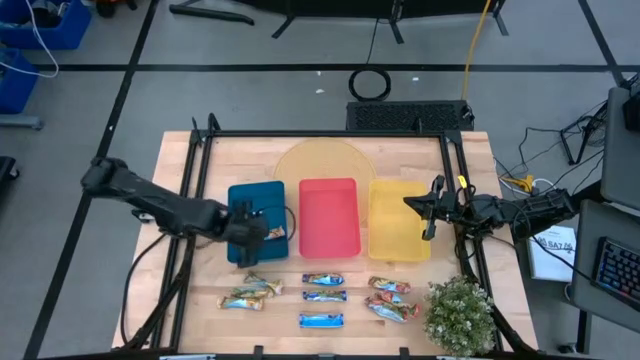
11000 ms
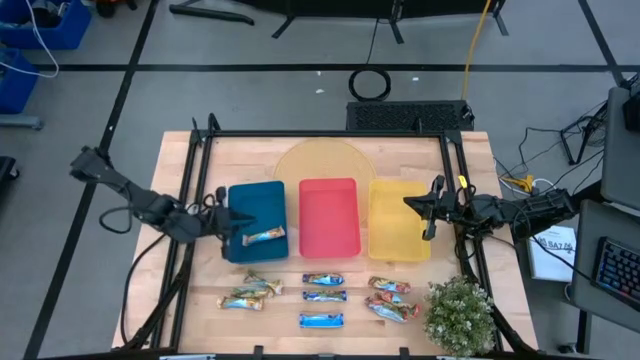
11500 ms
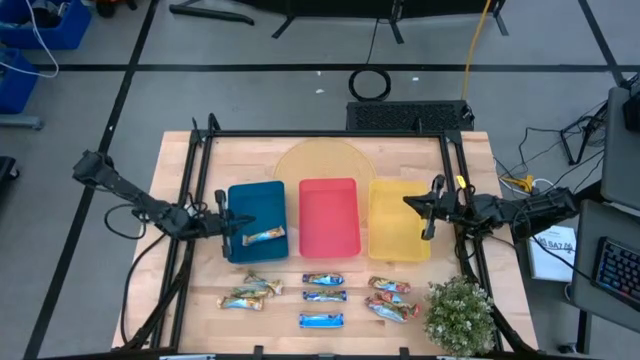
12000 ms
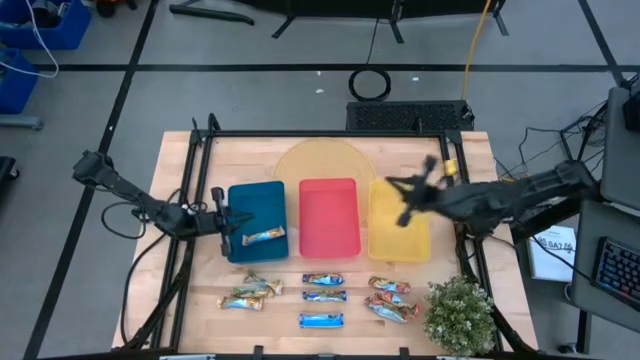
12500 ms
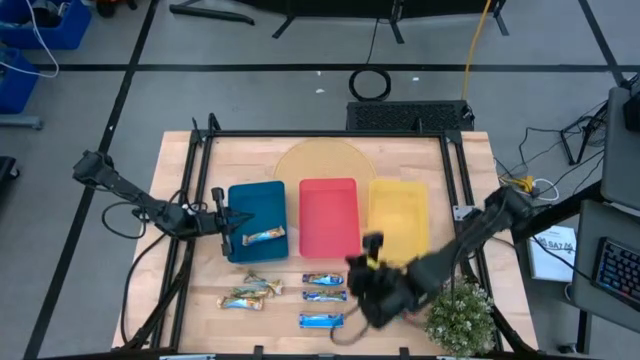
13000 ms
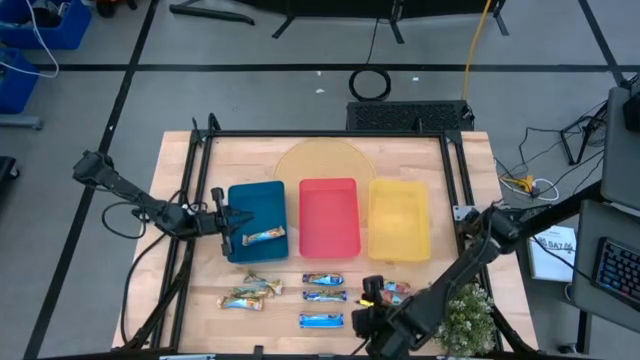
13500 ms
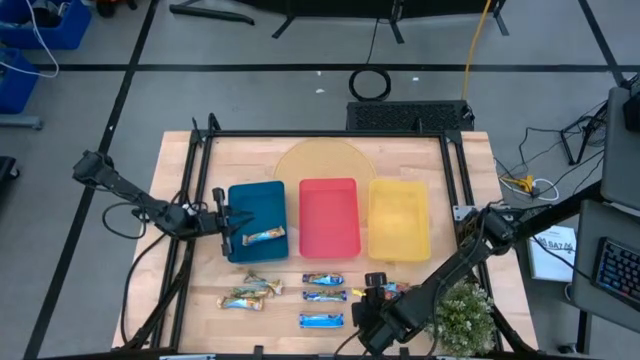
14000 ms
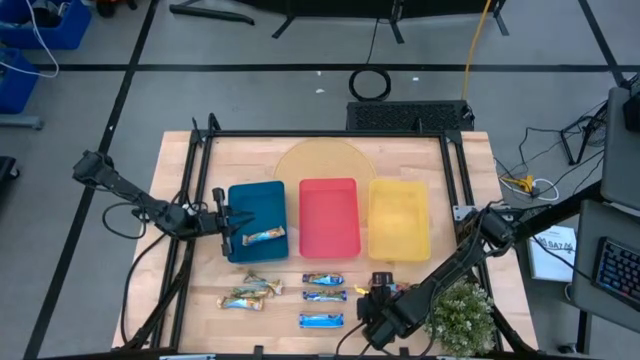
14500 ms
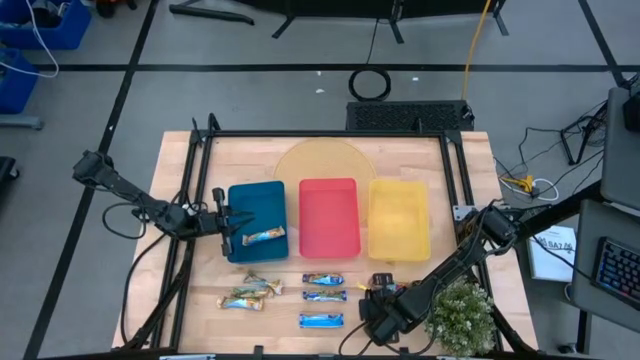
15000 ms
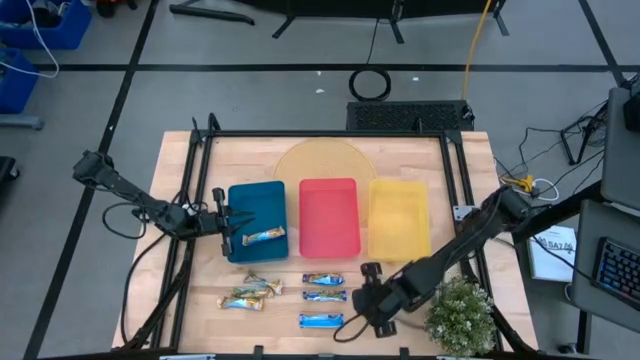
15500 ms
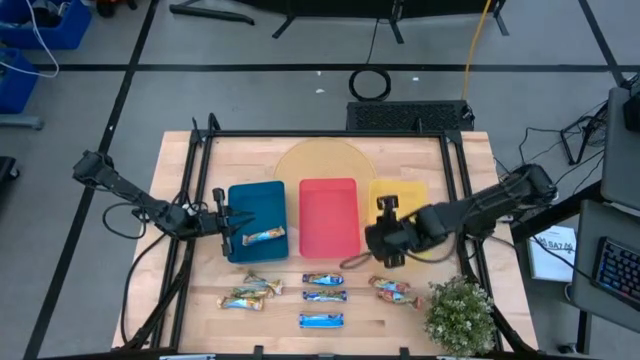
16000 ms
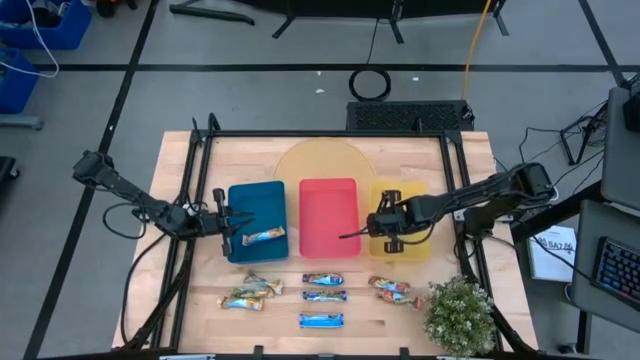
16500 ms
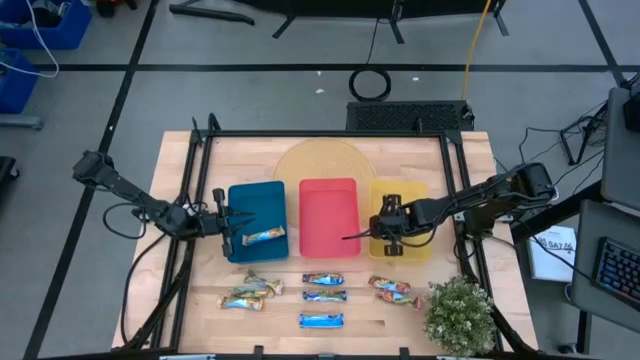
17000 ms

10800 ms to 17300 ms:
Task: Pick and place Granola Bars by type
Put the bottom red granola bar into the yellow bin

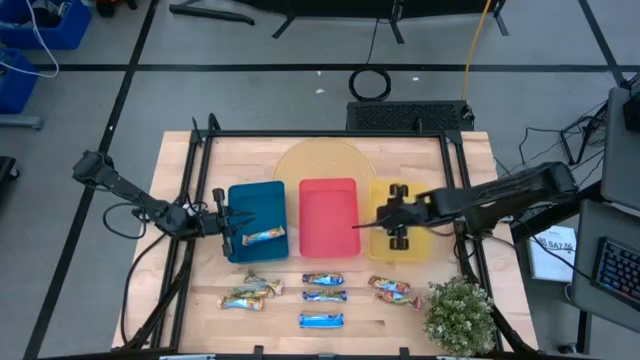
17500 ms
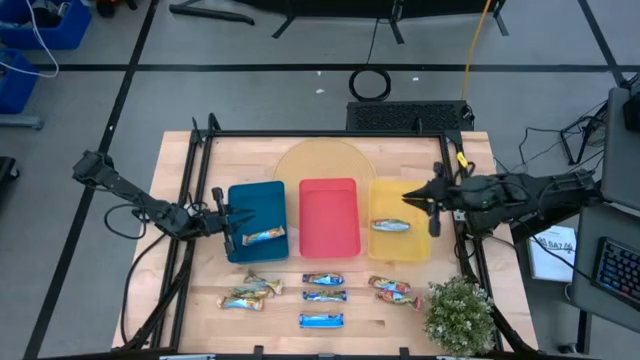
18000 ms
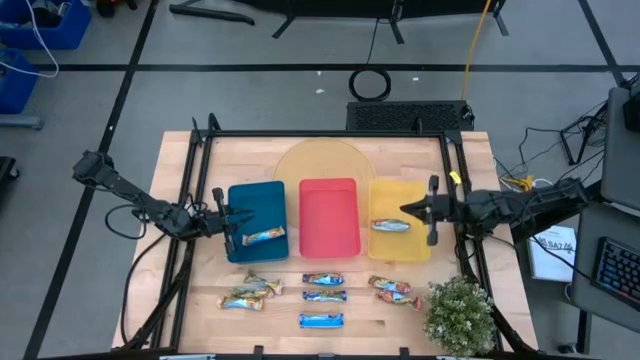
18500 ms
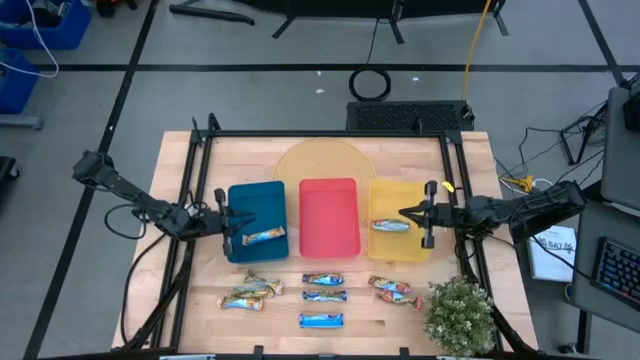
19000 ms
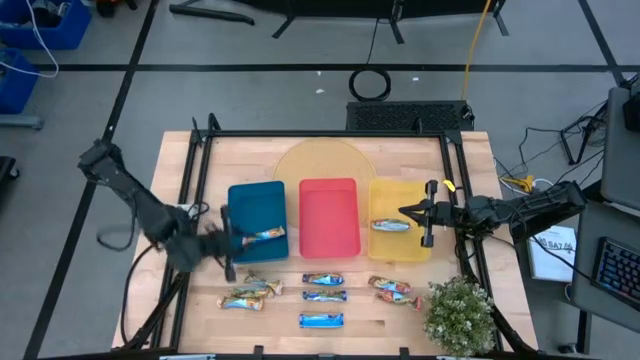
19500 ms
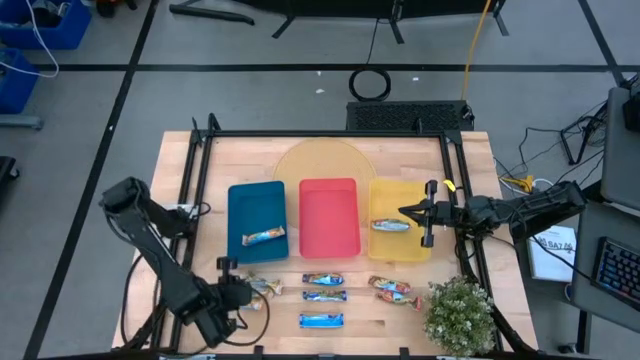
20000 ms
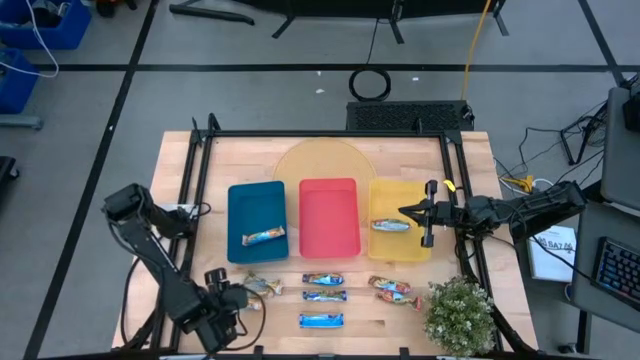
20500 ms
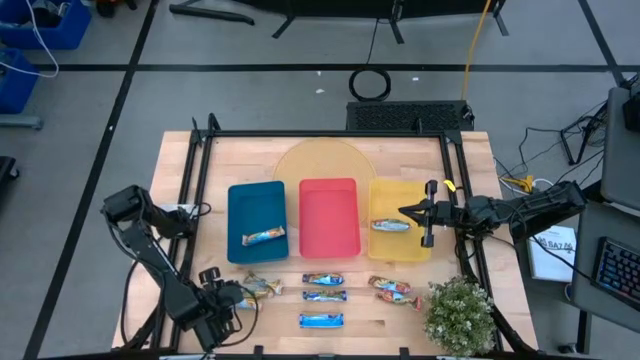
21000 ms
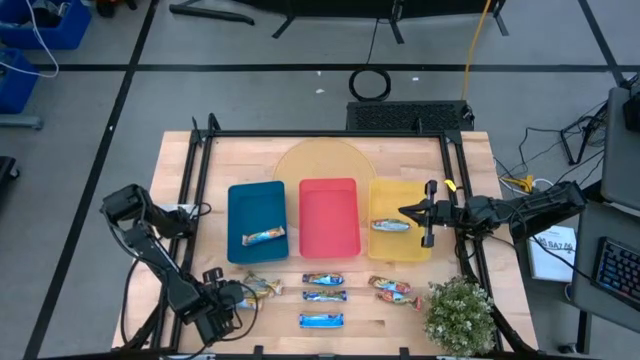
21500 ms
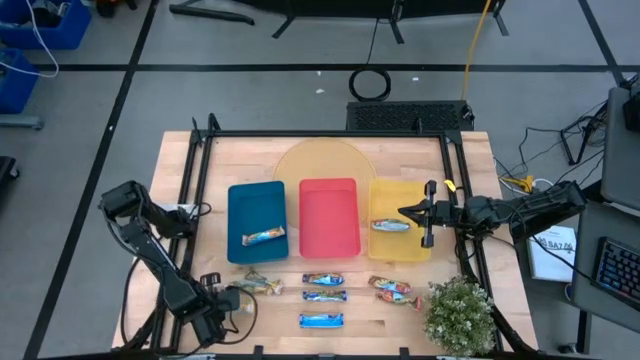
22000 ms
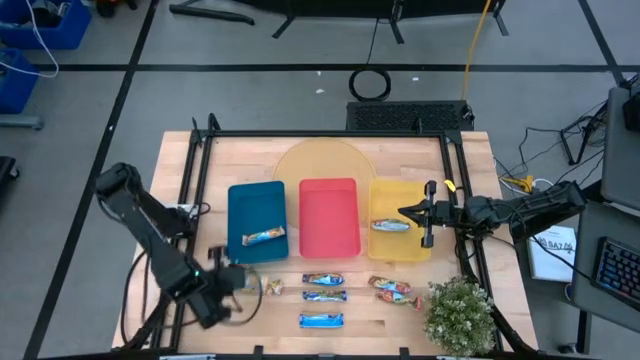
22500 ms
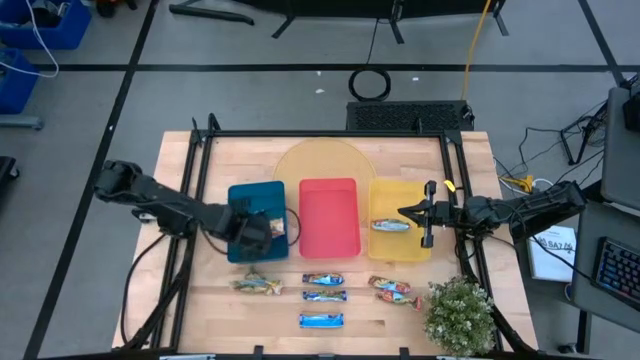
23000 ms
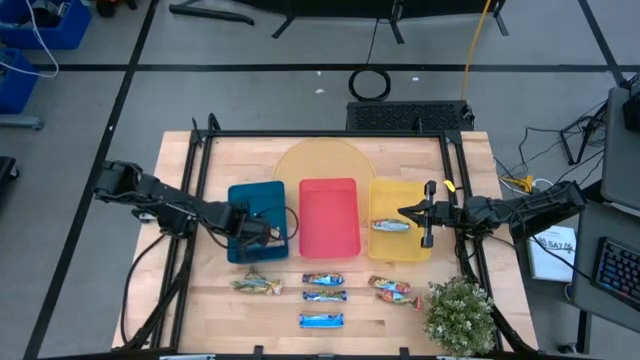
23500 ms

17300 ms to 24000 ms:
Put the bottom green granola bar into the blue bin

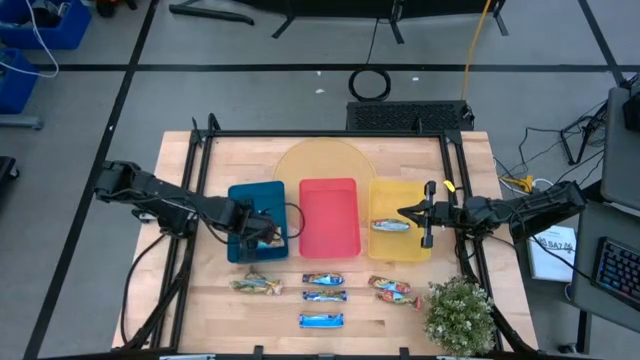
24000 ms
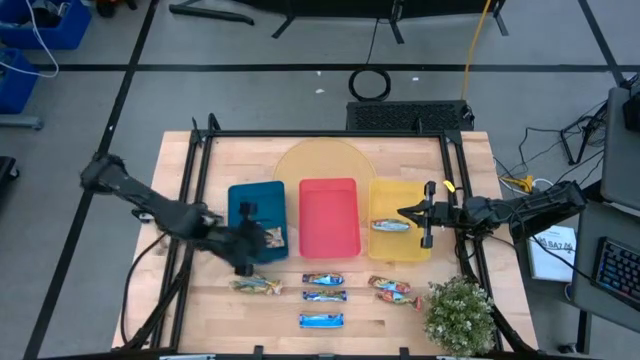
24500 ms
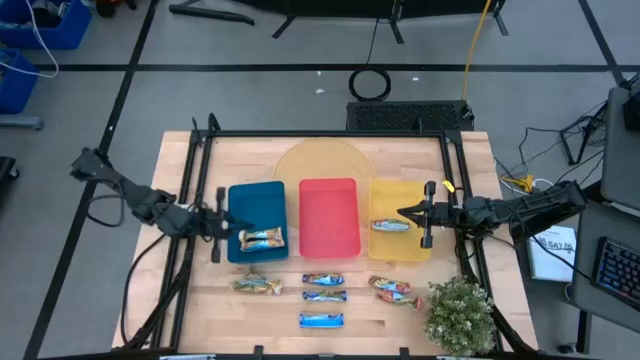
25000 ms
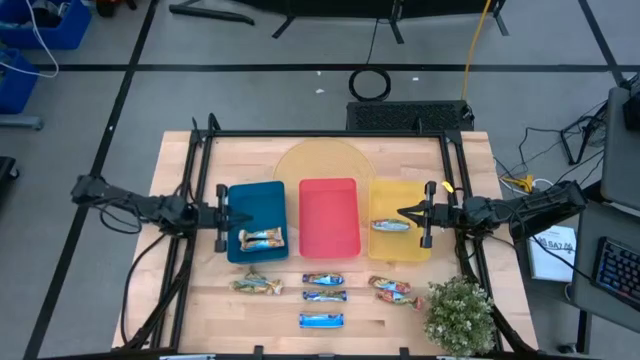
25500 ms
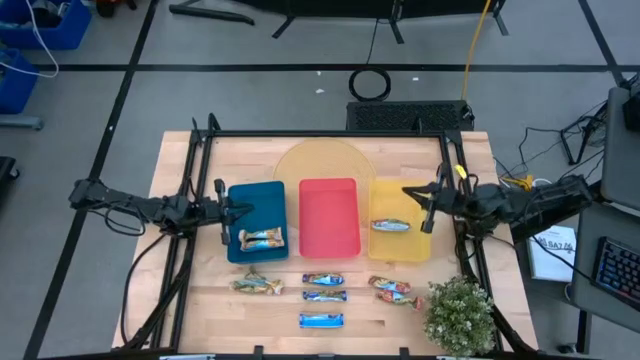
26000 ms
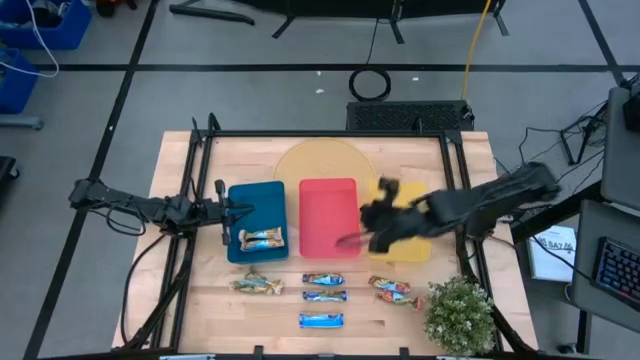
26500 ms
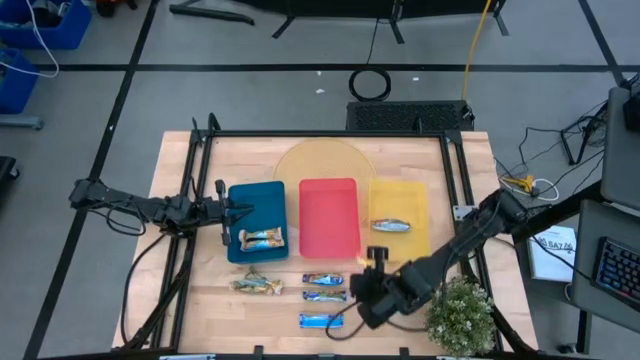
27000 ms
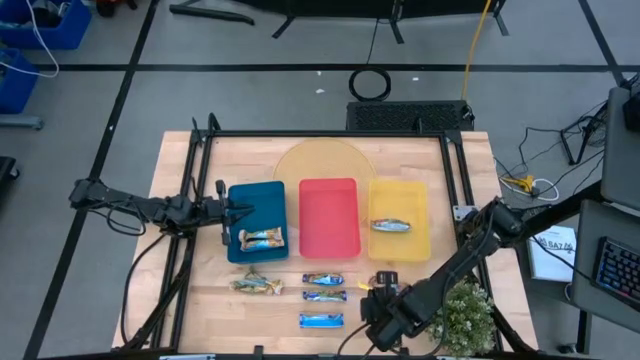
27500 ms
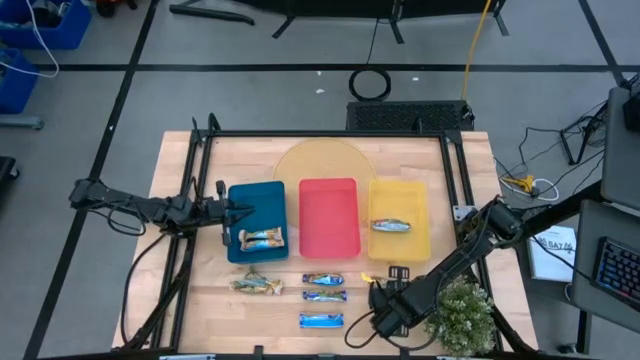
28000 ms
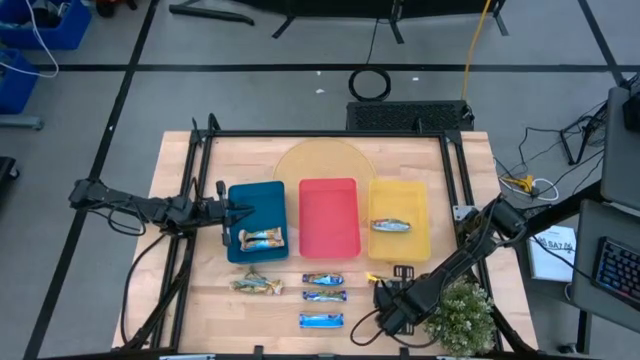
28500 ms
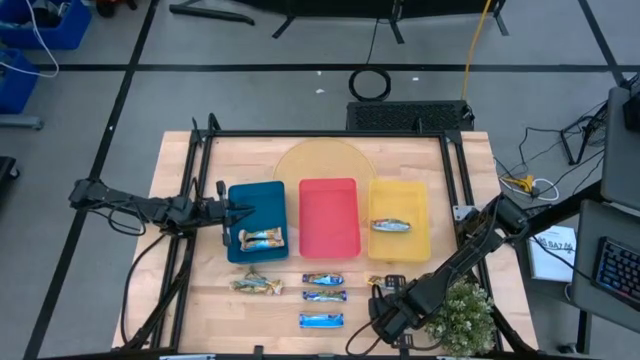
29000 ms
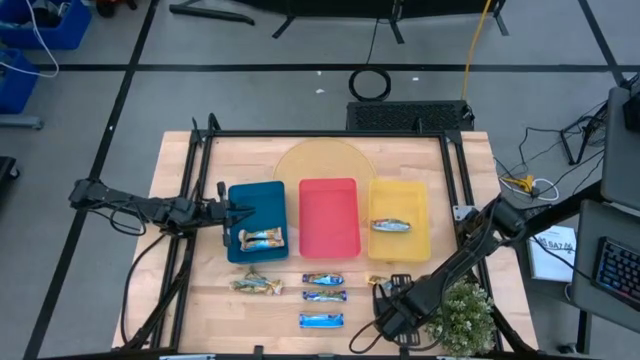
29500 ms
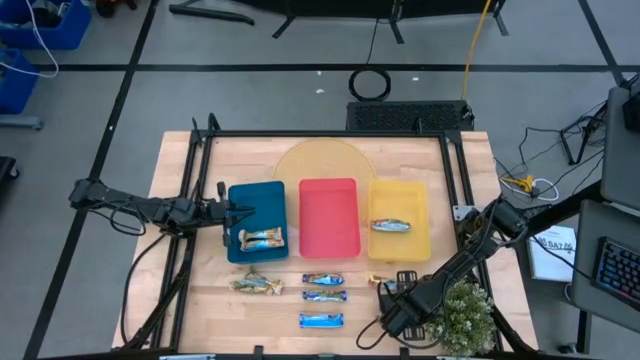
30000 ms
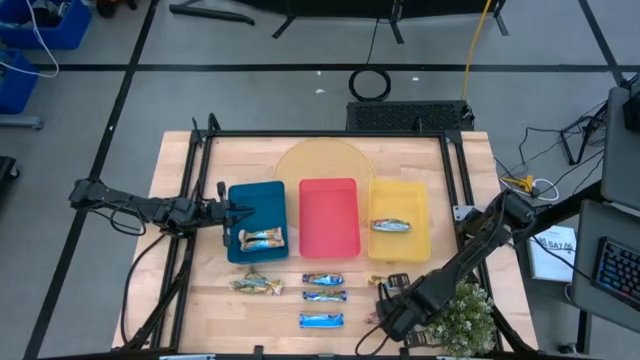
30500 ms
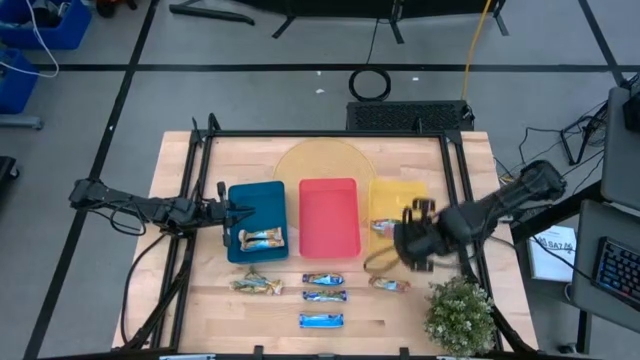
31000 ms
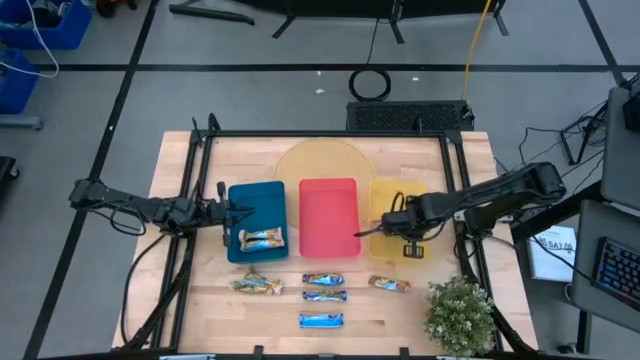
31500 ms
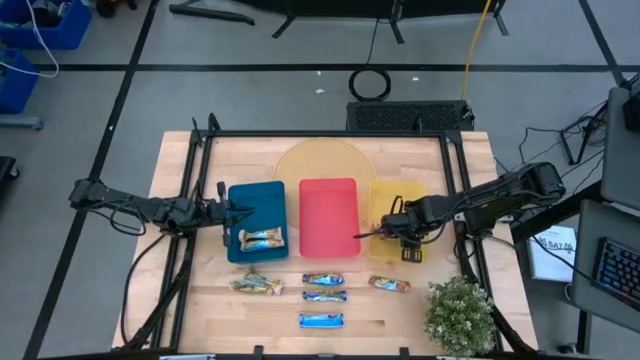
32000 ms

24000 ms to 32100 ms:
Put the bottom red granola bar into the yellow bin

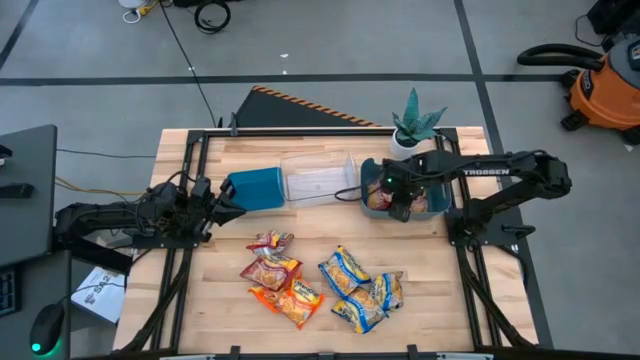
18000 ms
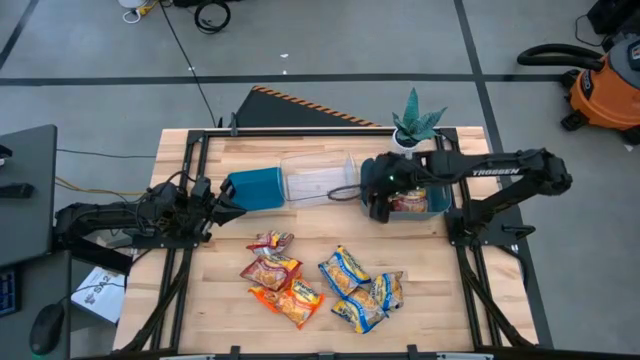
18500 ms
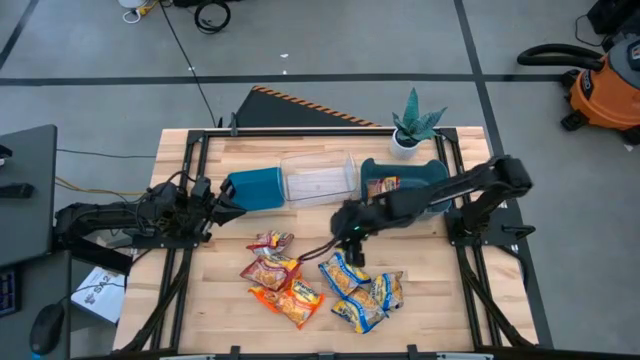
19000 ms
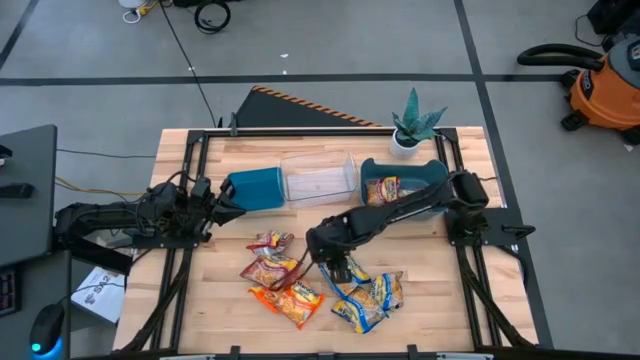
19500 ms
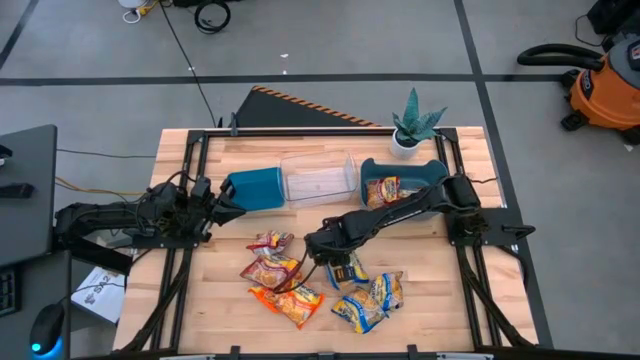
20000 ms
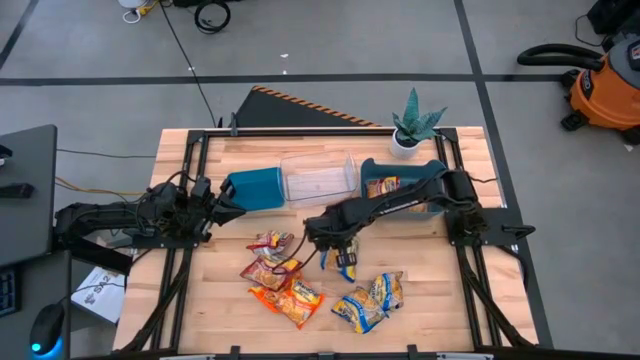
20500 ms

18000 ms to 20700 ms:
Task: Sort Maruchan noodles
Put the top blue noddle pack into the transparent shelf
